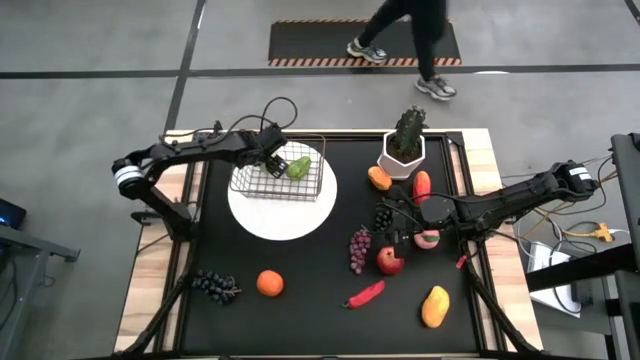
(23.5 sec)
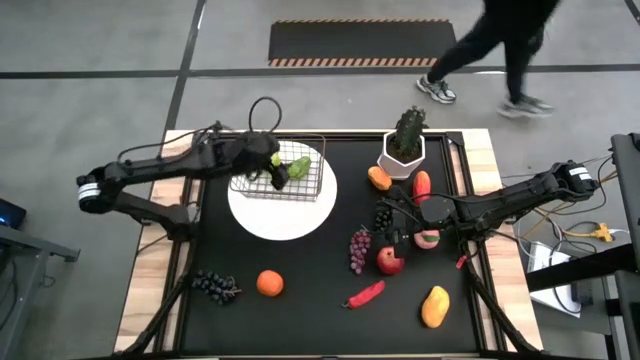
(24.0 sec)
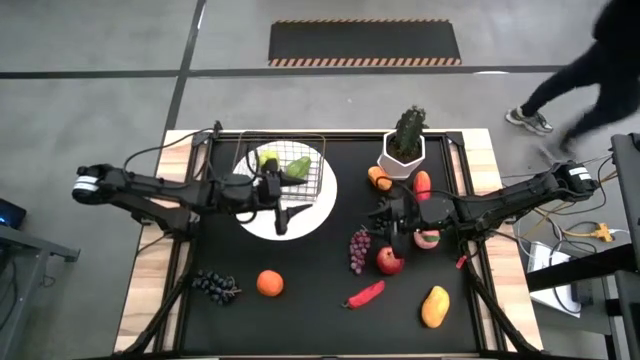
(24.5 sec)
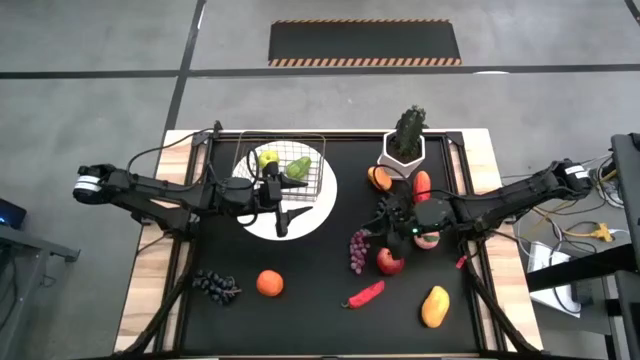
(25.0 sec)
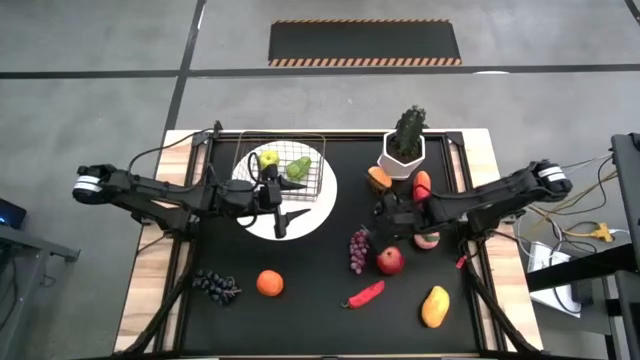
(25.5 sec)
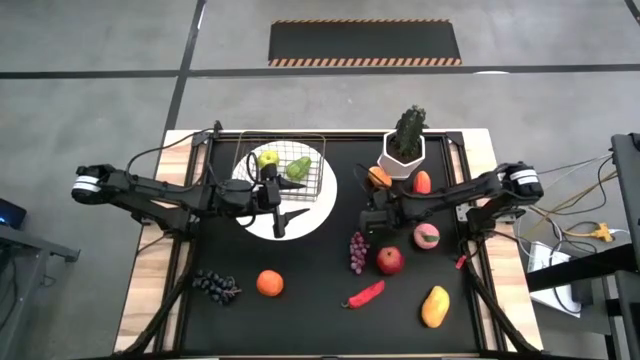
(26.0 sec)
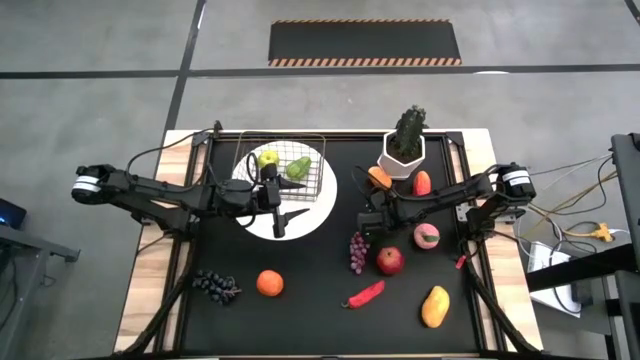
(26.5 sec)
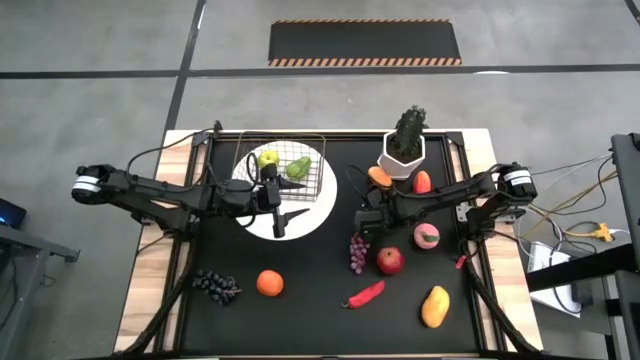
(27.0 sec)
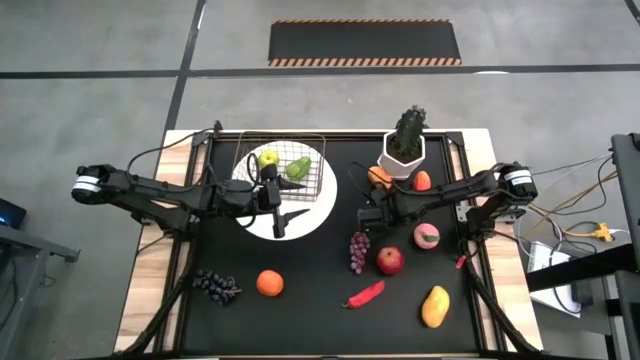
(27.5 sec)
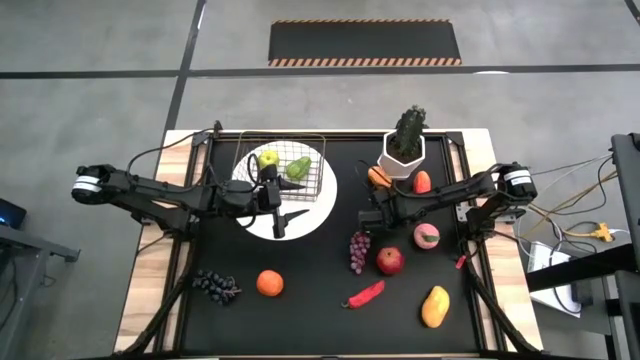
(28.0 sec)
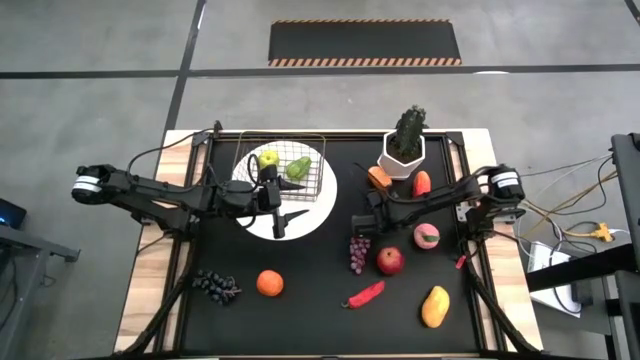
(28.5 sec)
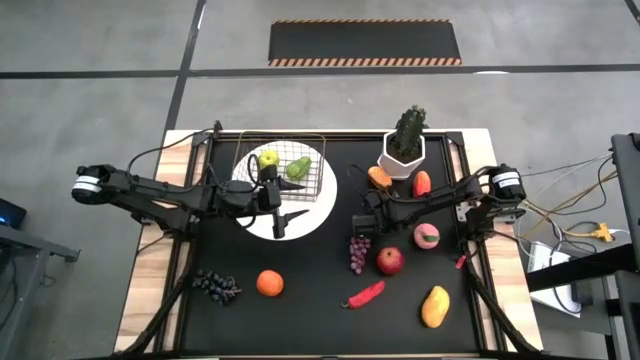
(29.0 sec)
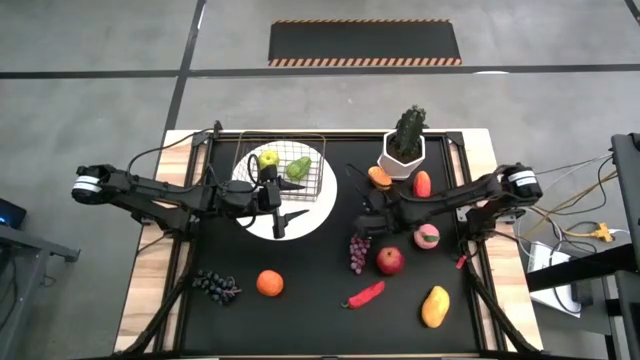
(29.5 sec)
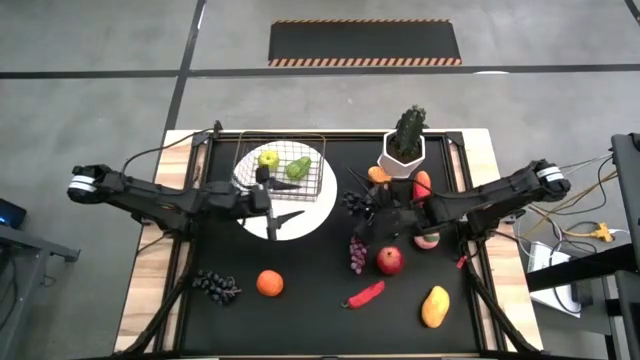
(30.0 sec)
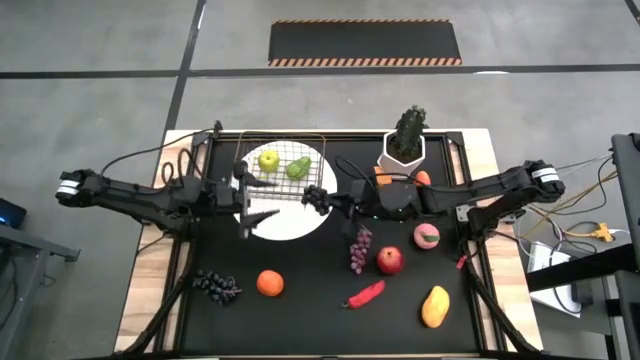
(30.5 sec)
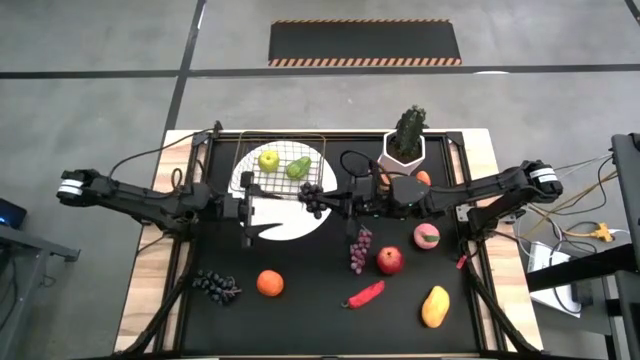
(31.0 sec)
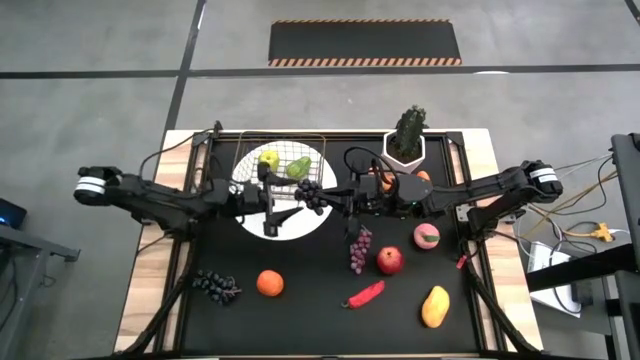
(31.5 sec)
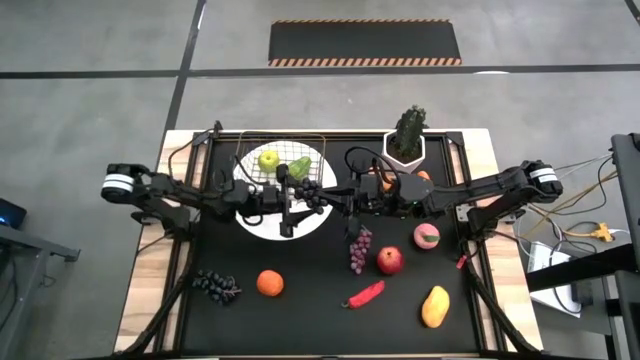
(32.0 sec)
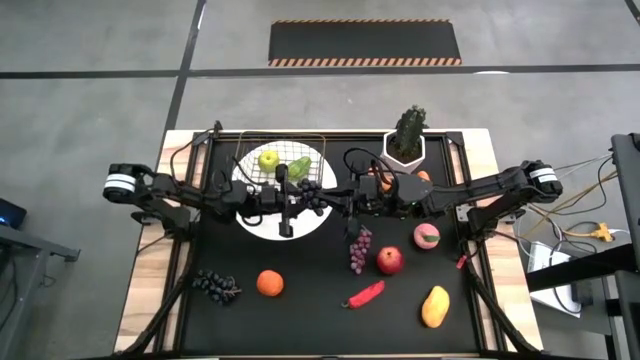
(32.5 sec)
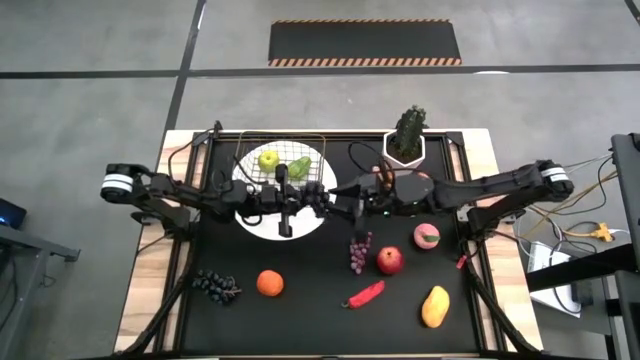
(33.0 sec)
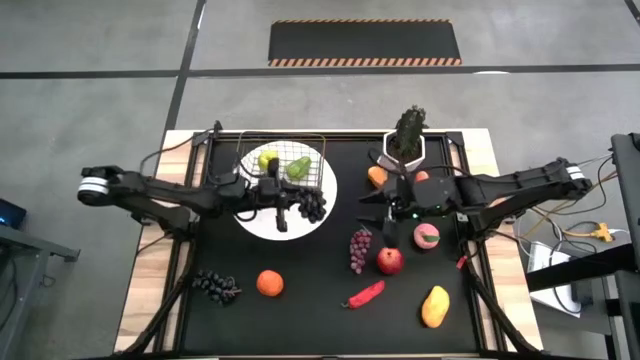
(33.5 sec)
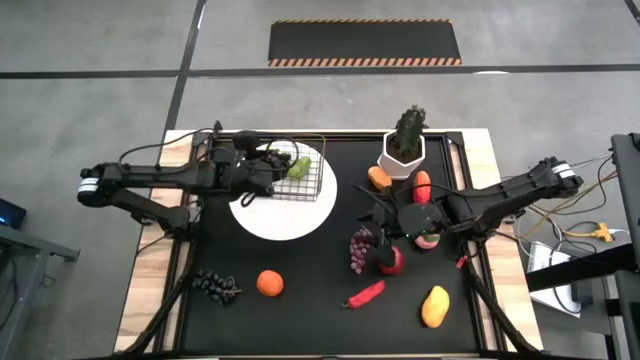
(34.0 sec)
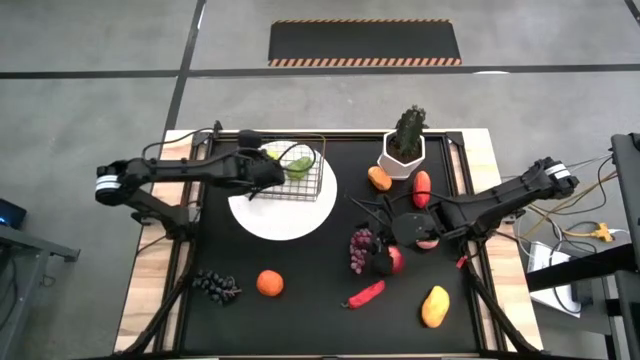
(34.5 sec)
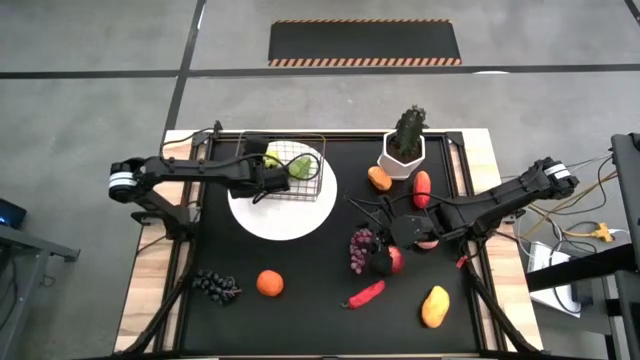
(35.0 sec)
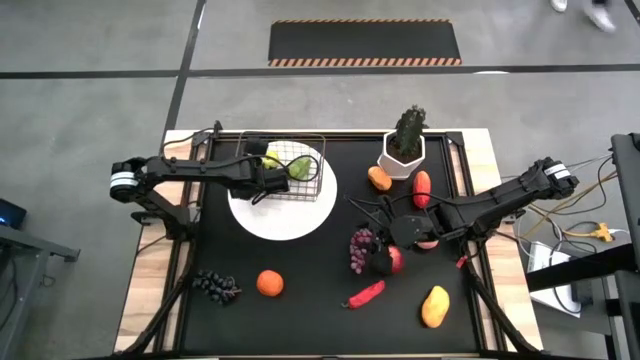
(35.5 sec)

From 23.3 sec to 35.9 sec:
Task: Build produce basket
Put the top black grapes in the gold wire basket

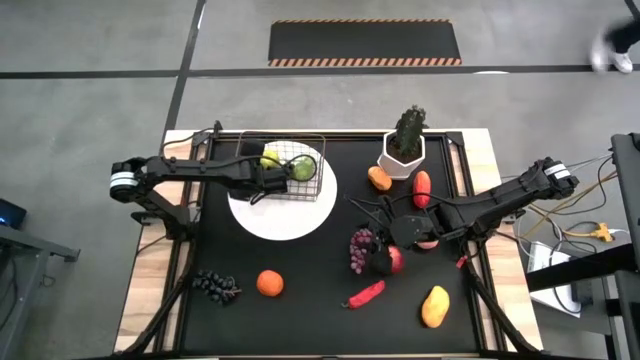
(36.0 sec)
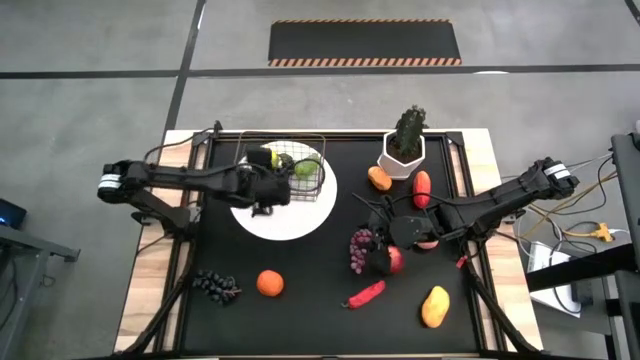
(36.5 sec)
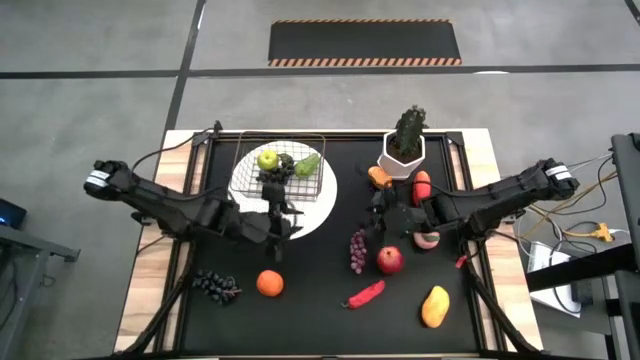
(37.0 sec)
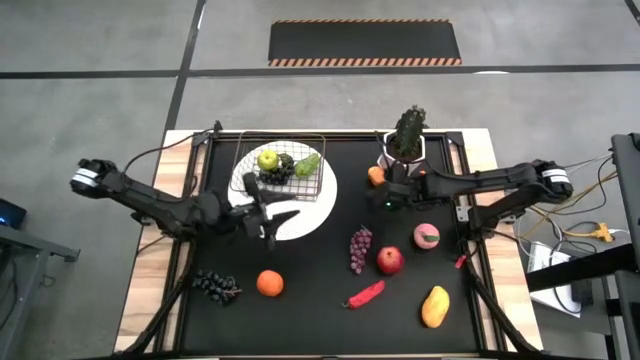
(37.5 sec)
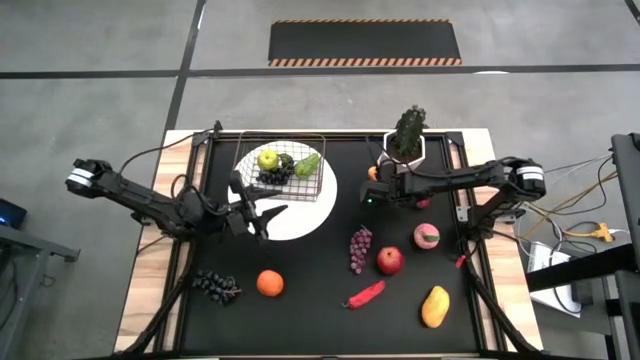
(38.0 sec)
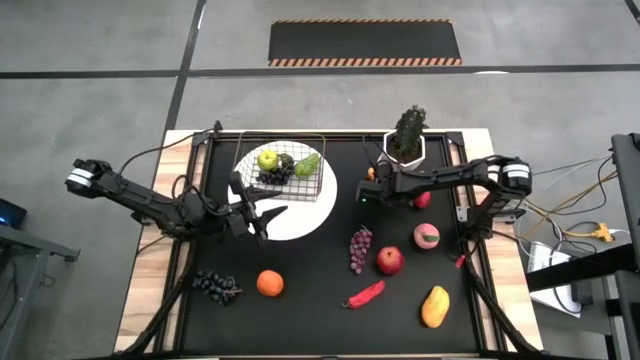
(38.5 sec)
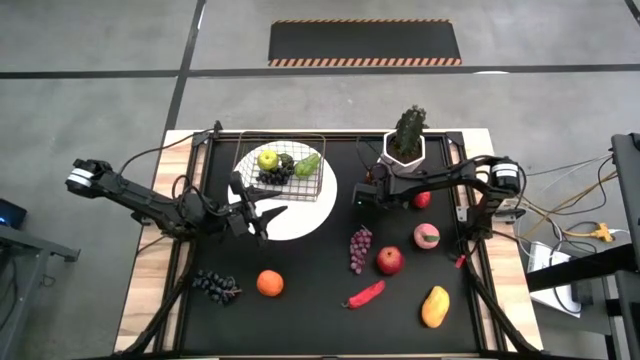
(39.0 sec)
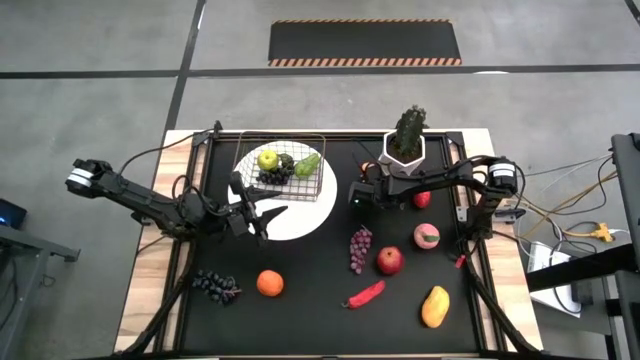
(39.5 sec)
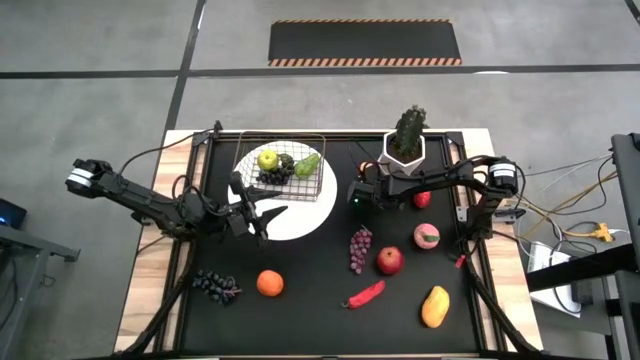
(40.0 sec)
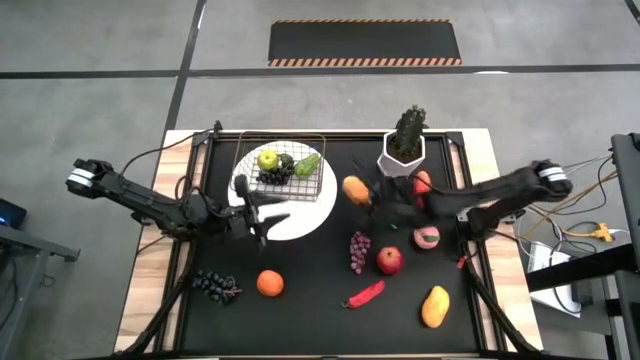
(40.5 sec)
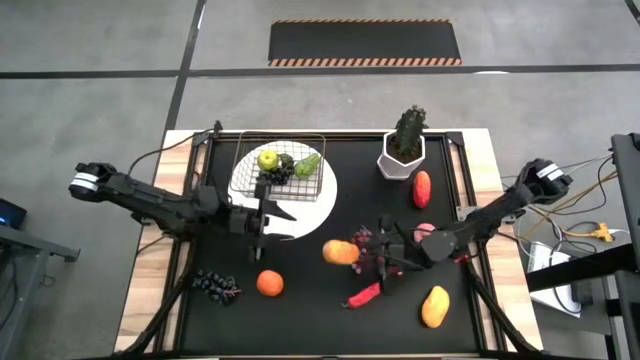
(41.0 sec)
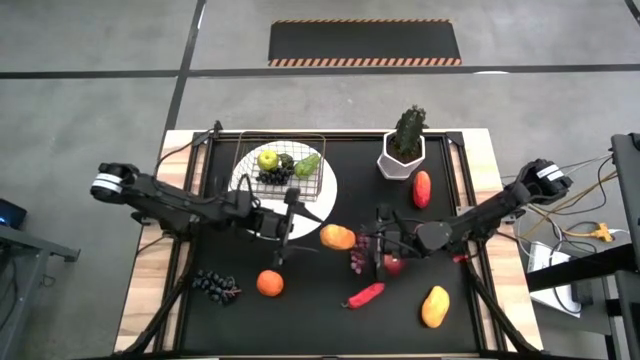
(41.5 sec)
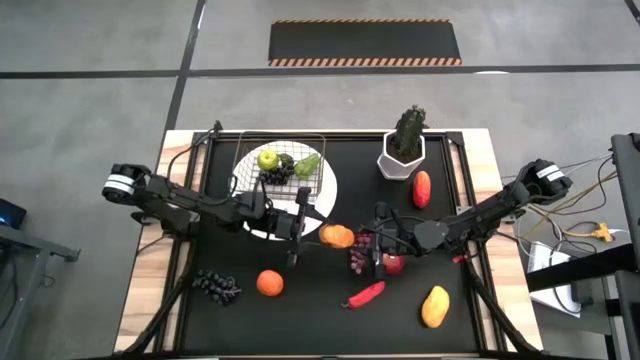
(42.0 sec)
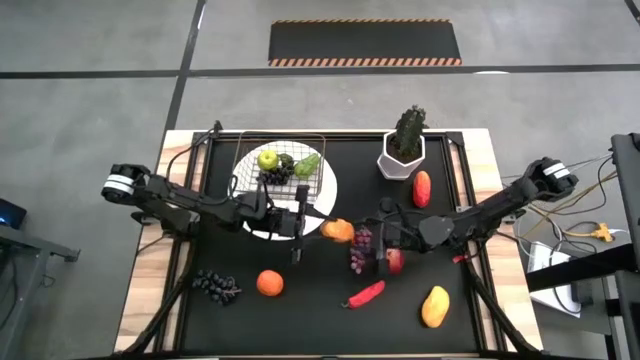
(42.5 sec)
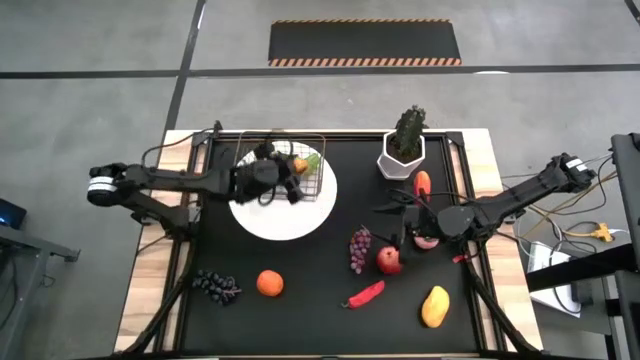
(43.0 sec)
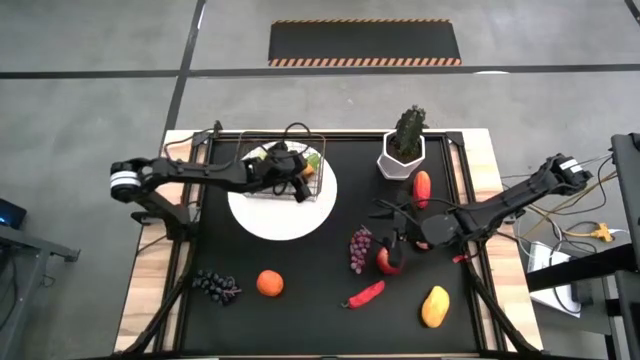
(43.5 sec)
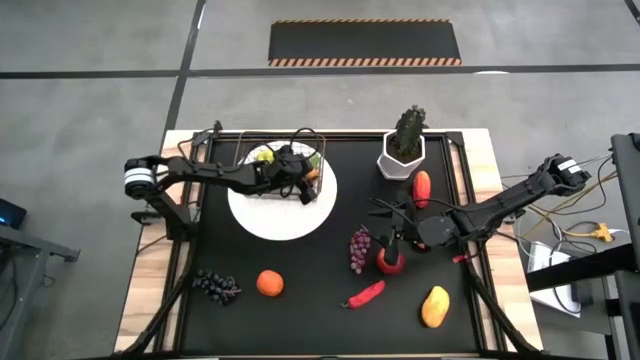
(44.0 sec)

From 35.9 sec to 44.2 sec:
Put the top left mango in the gold wire basket
